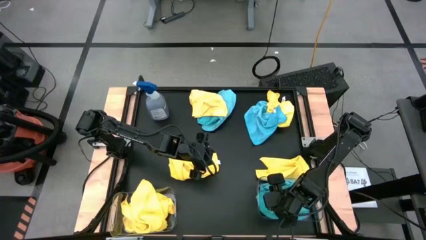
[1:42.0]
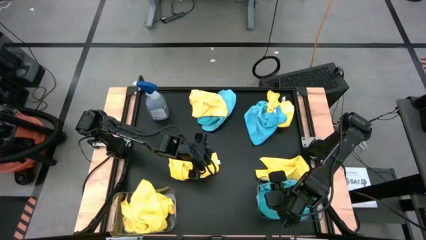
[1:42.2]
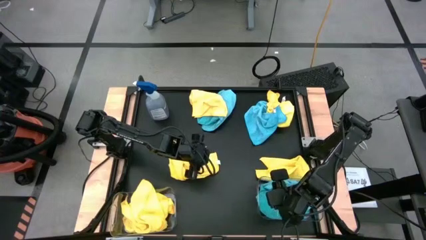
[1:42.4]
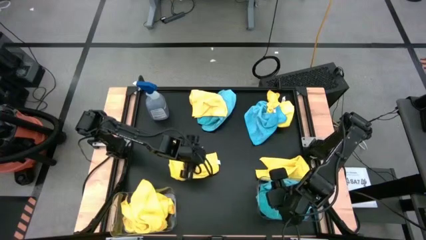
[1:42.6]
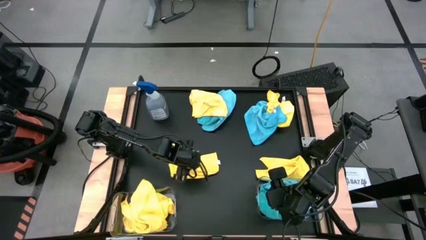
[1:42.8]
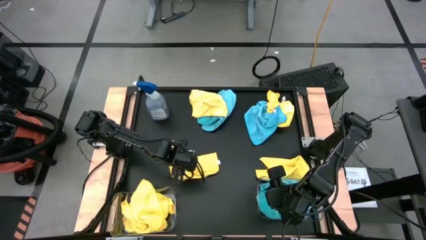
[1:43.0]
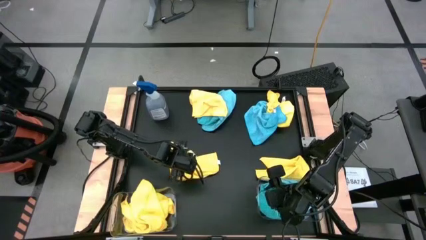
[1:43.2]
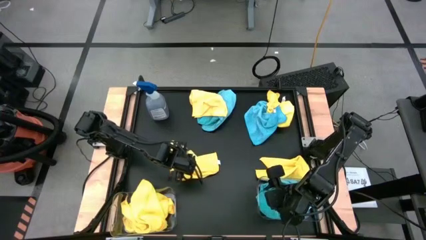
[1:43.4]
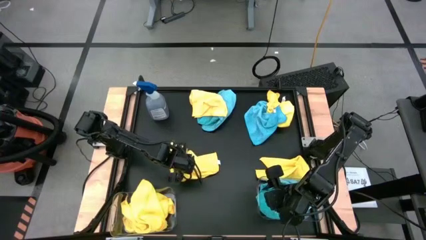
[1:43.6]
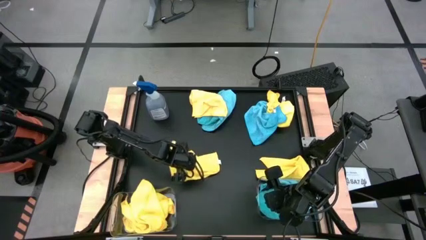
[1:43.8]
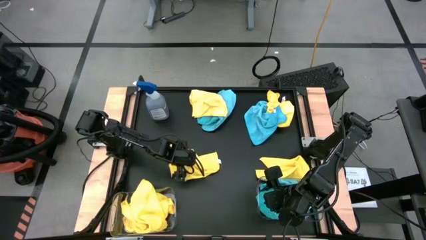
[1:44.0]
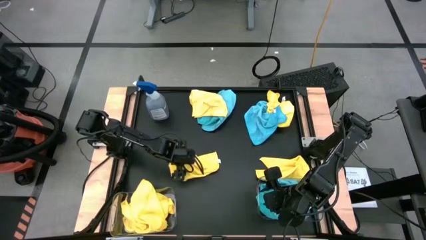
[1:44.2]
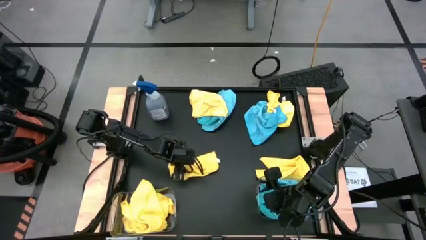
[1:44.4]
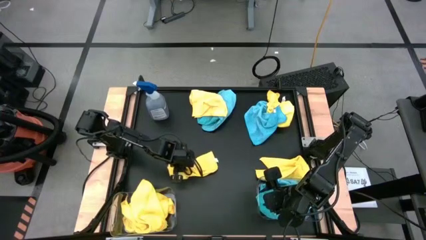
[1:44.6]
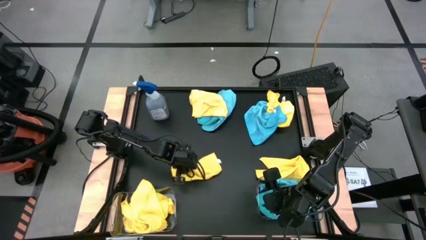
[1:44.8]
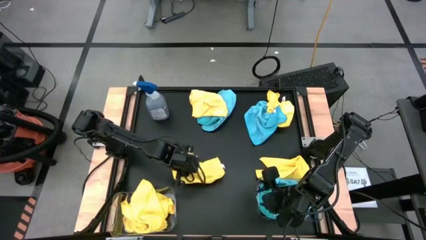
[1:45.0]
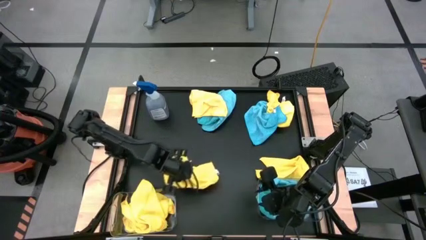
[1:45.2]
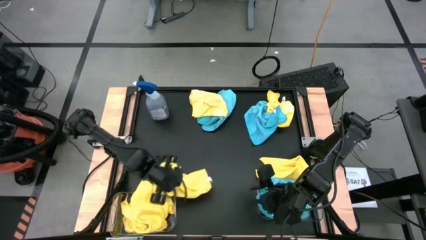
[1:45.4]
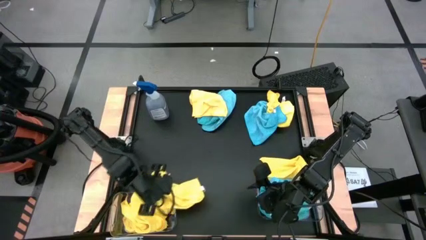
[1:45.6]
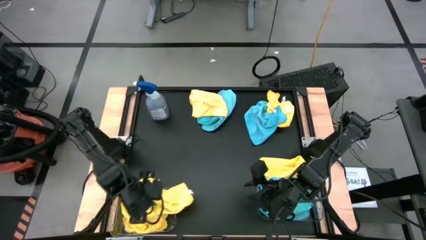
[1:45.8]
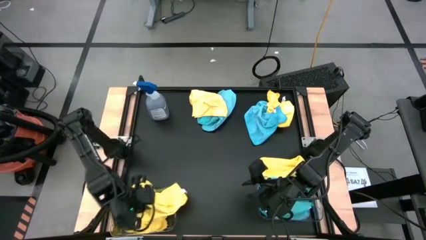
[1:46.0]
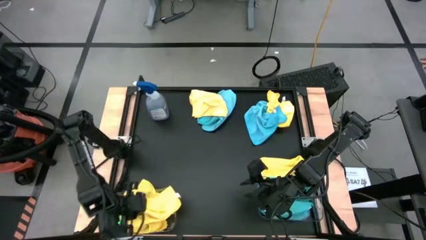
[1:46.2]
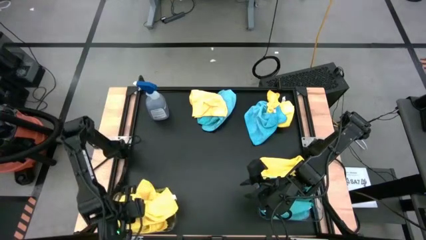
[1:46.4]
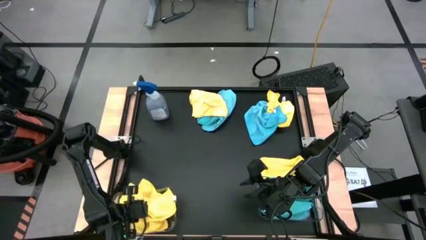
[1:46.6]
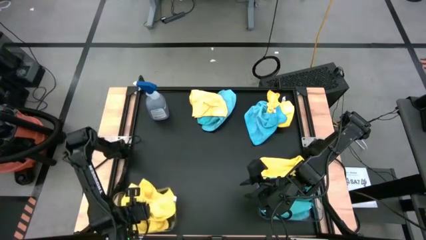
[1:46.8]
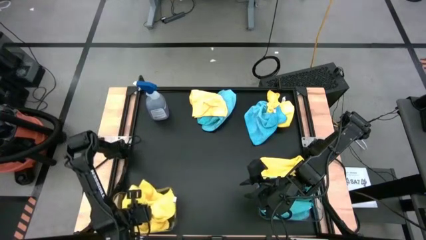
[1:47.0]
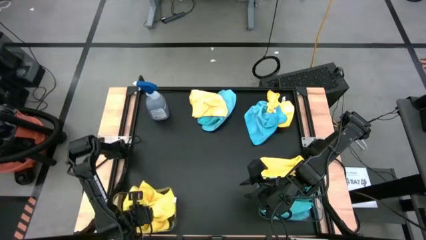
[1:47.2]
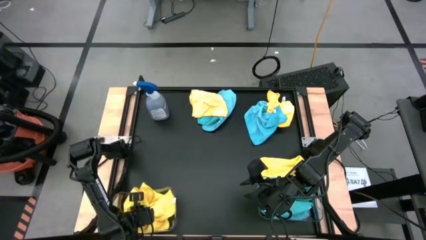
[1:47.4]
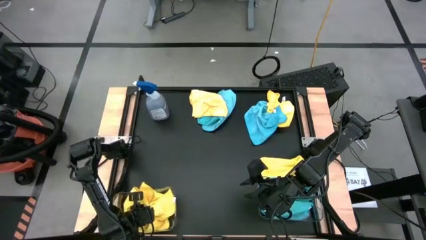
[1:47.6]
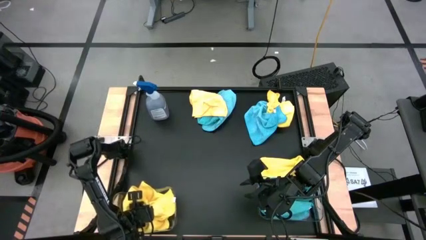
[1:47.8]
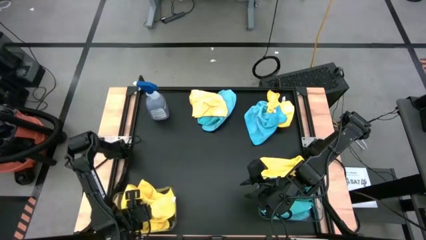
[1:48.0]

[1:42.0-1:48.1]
Task: Sort microfiber towel by color & place in baskets
Put the yellow towel into the left transparent bin

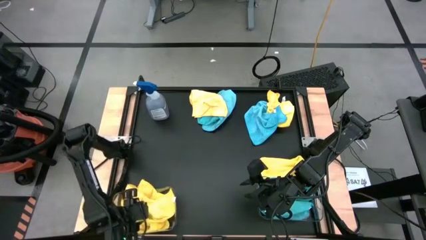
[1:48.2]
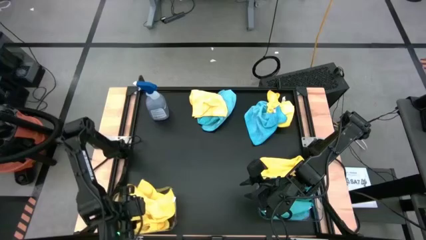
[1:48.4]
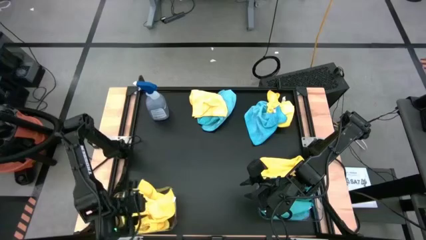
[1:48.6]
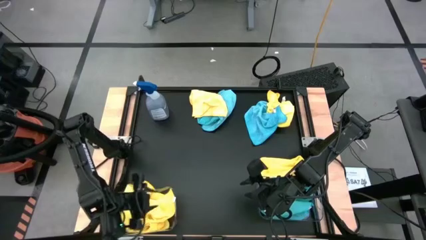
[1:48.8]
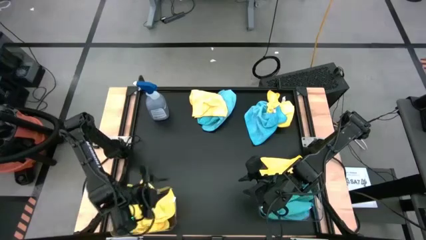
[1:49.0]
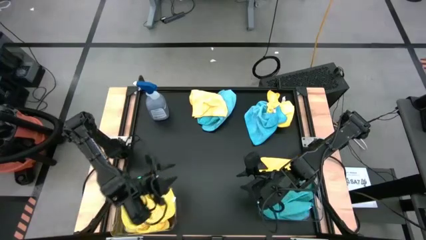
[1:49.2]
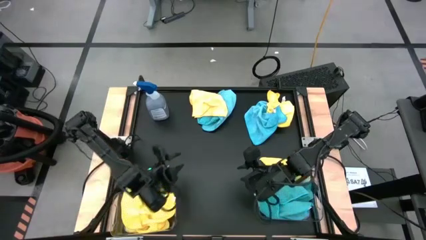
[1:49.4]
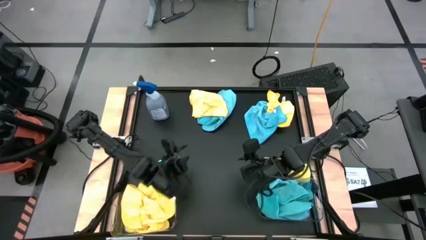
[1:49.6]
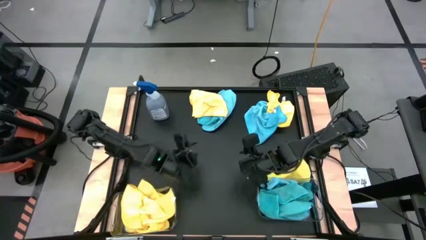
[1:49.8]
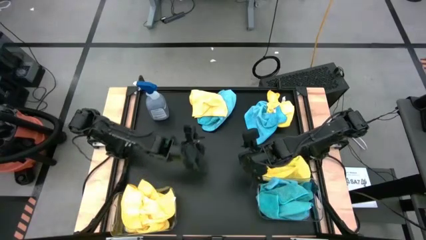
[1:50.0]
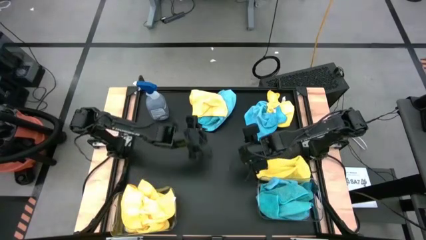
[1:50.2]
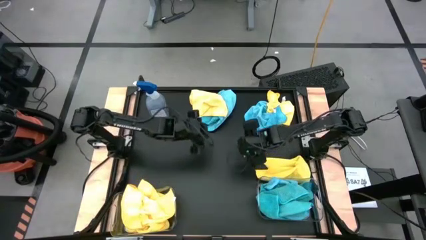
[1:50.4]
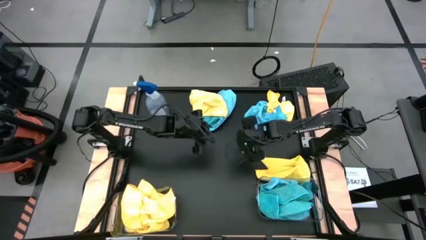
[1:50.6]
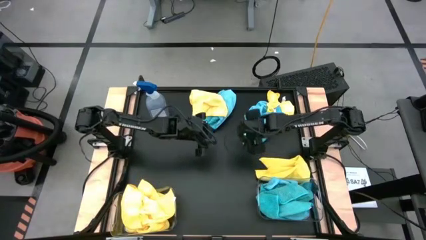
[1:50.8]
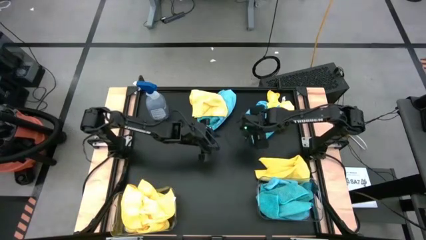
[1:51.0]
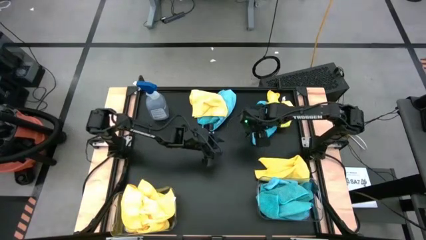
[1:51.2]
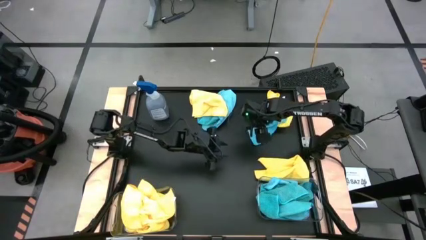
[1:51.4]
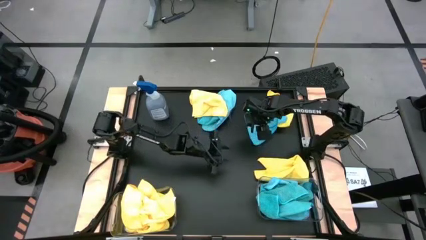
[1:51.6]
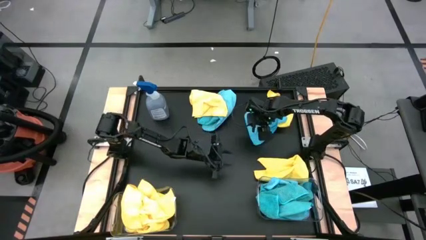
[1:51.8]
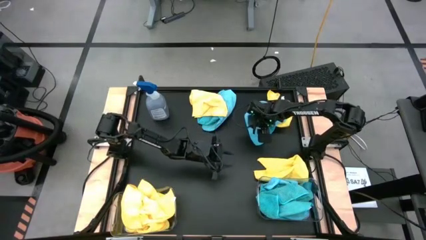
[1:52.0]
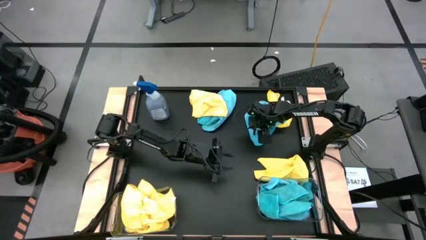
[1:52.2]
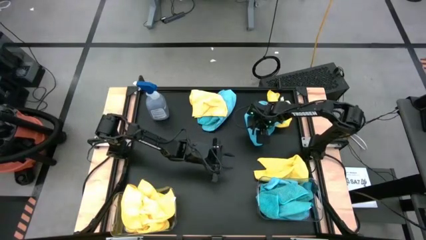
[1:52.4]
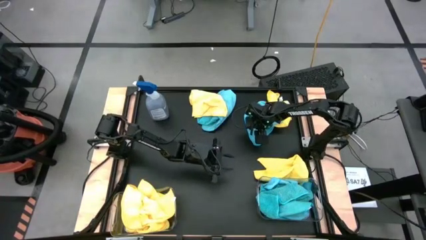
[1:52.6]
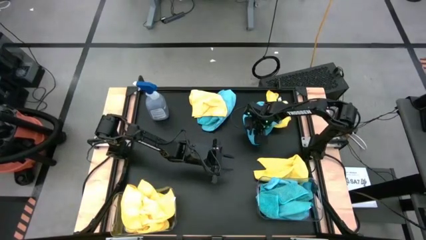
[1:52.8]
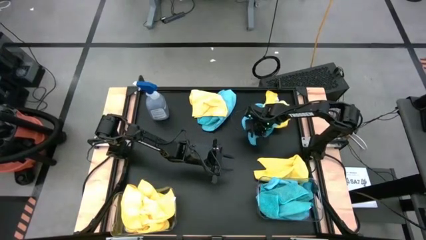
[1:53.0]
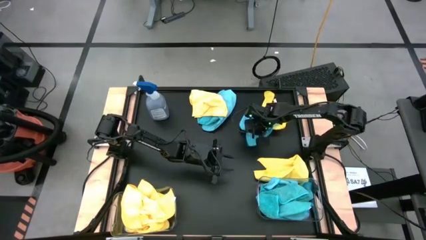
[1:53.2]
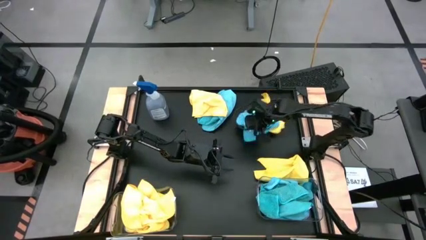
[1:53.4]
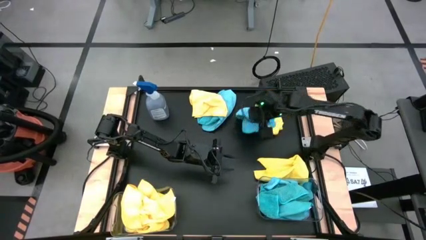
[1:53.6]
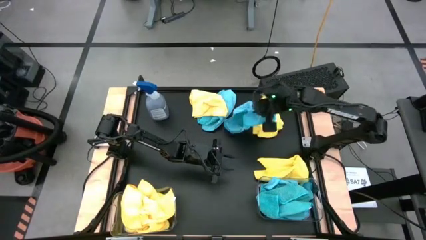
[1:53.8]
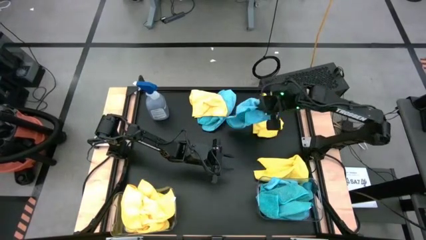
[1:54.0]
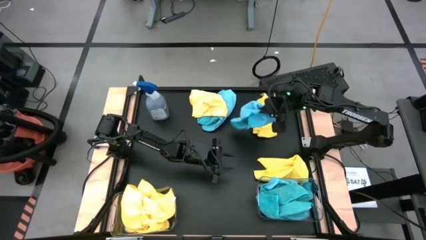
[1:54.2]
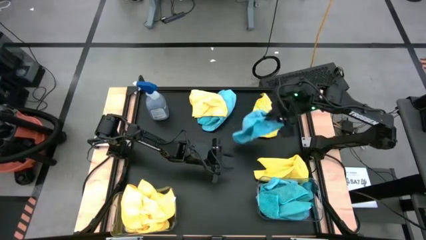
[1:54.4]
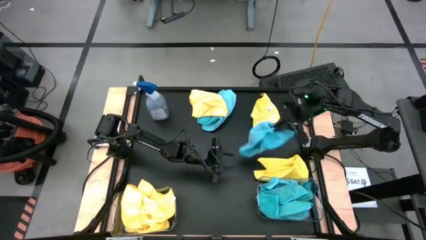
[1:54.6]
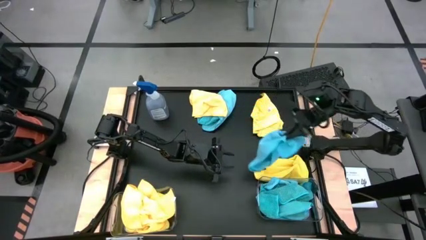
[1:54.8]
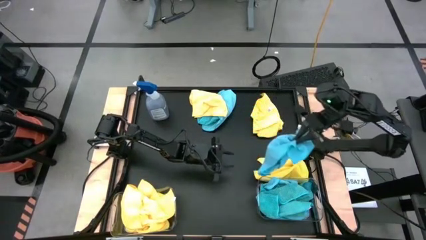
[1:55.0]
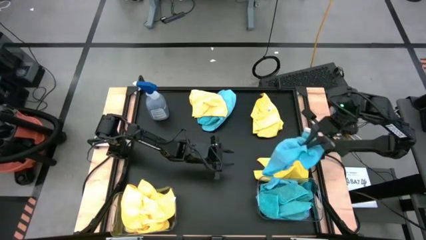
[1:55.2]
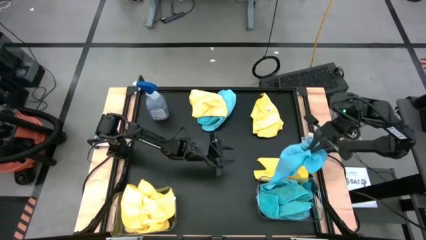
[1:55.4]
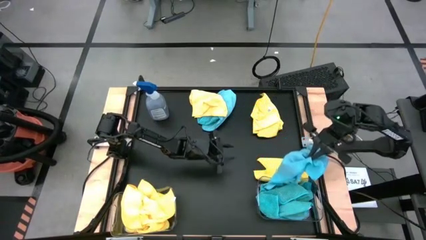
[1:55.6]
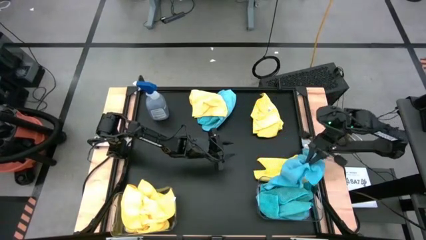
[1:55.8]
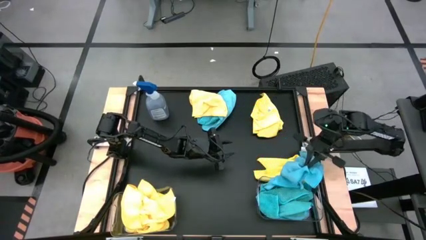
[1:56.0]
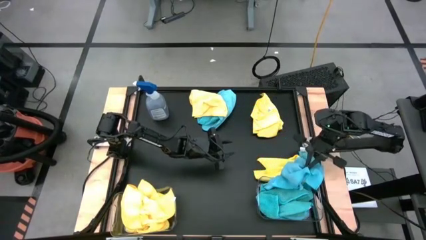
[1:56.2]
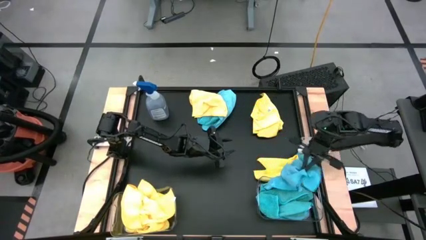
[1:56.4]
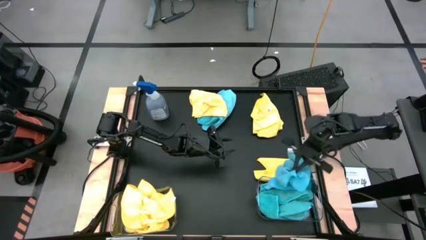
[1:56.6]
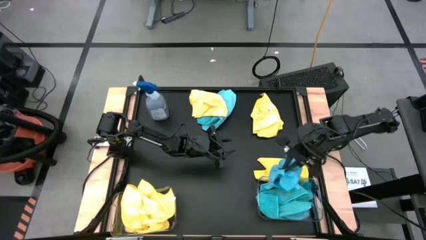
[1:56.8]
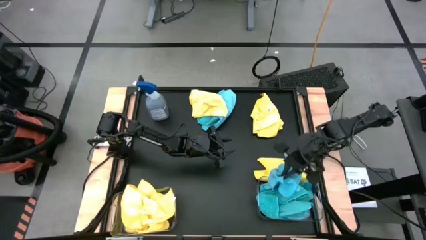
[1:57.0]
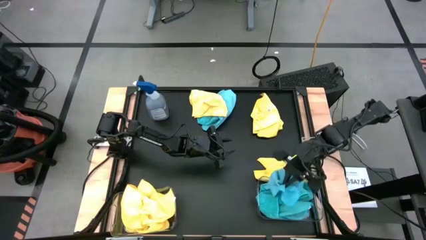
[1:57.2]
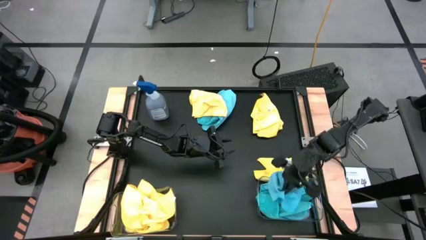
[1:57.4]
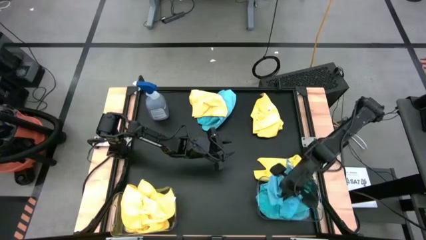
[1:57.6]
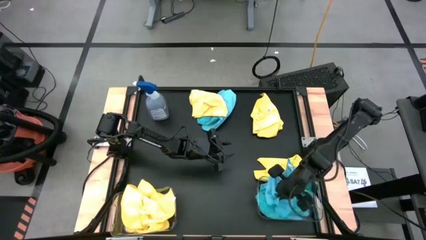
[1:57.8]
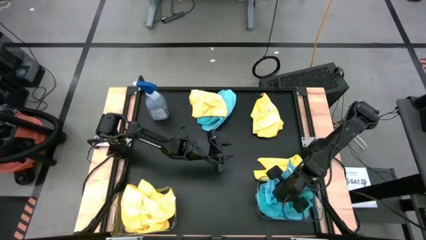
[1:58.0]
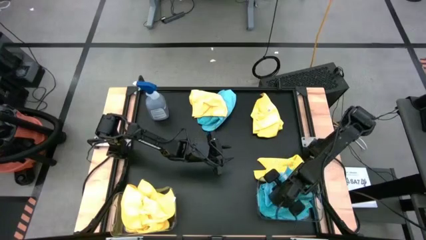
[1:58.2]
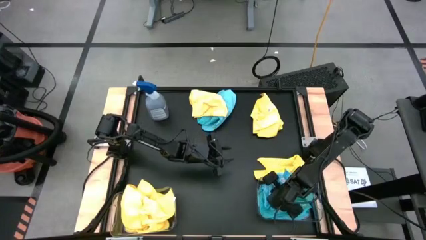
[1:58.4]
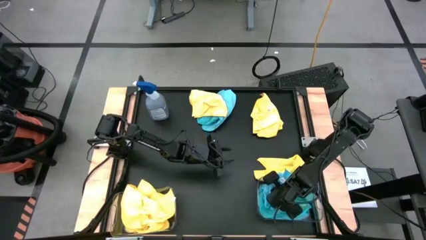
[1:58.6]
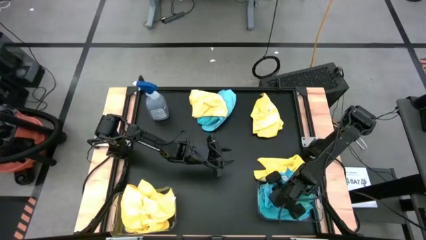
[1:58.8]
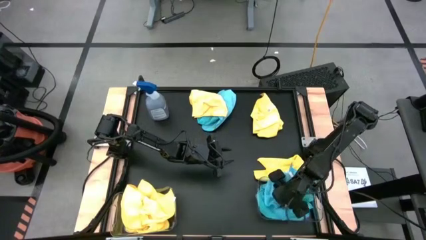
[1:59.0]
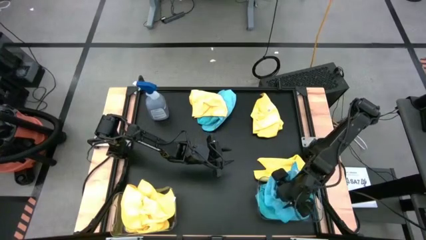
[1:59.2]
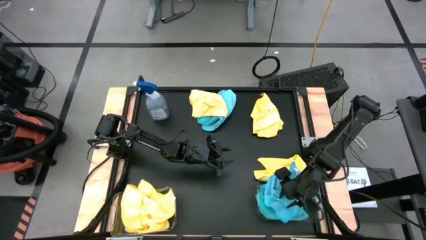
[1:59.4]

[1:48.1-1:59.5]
Put the blue towel into the right transparent bin
